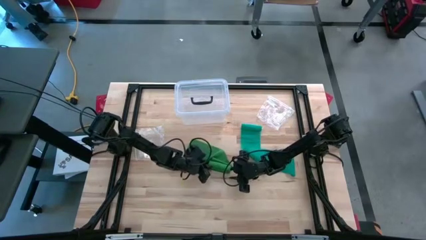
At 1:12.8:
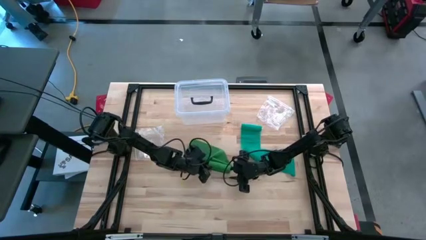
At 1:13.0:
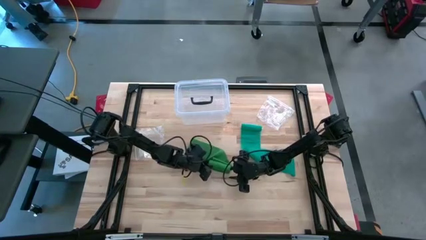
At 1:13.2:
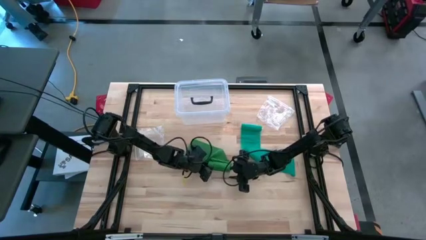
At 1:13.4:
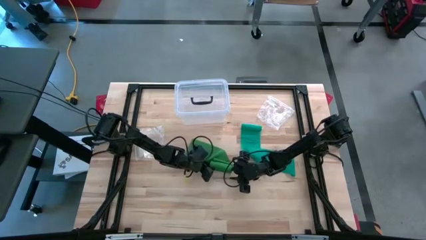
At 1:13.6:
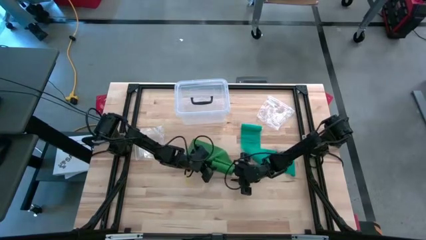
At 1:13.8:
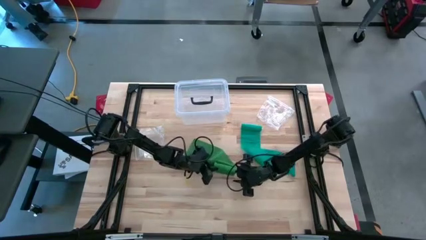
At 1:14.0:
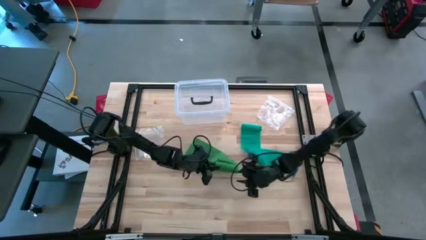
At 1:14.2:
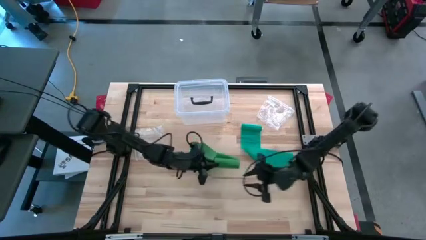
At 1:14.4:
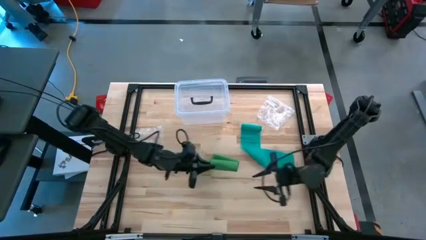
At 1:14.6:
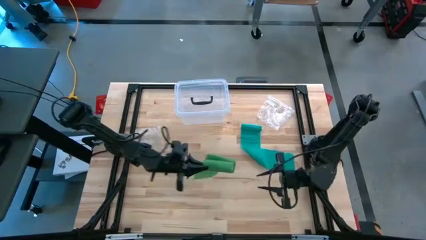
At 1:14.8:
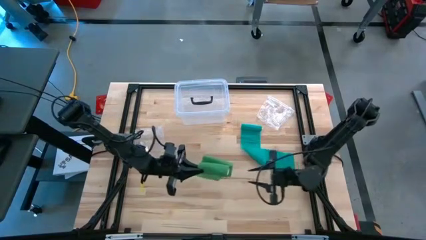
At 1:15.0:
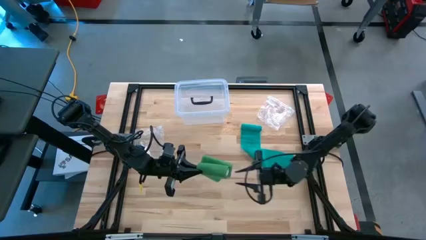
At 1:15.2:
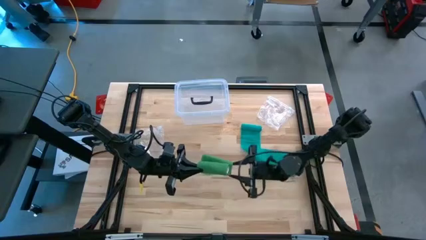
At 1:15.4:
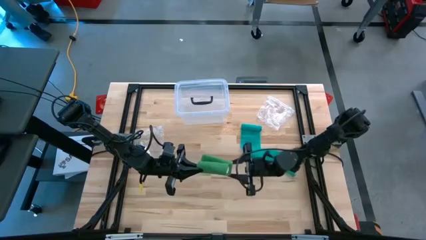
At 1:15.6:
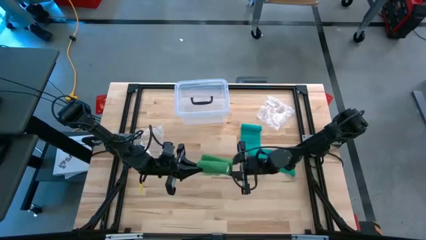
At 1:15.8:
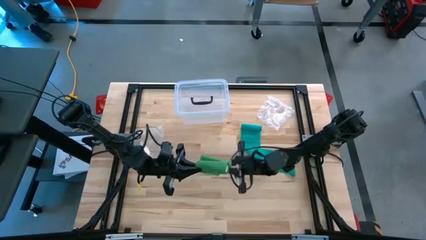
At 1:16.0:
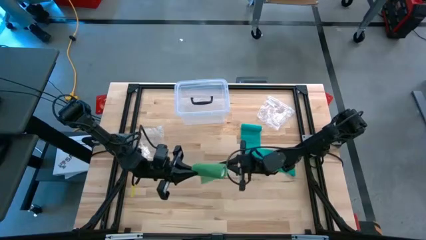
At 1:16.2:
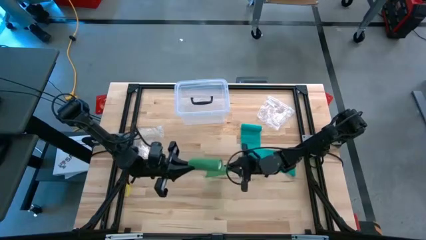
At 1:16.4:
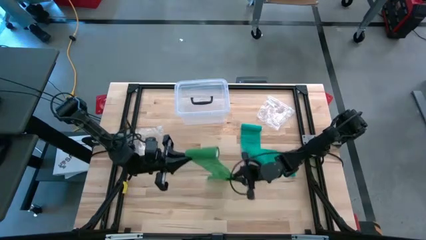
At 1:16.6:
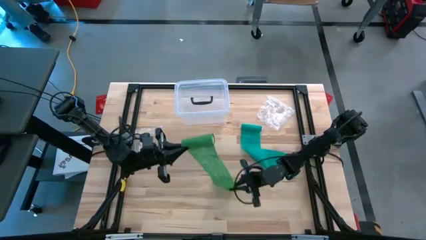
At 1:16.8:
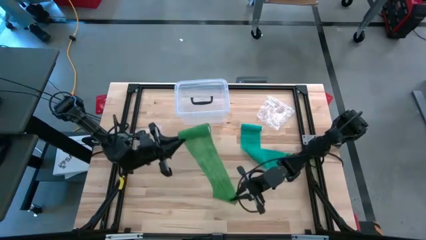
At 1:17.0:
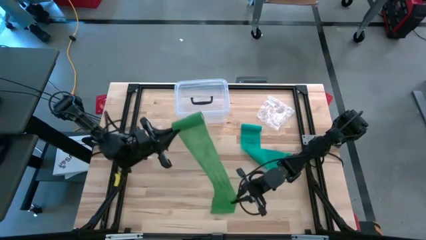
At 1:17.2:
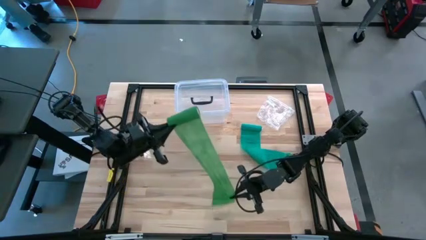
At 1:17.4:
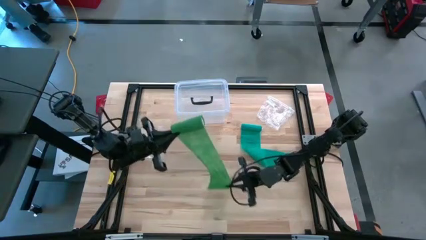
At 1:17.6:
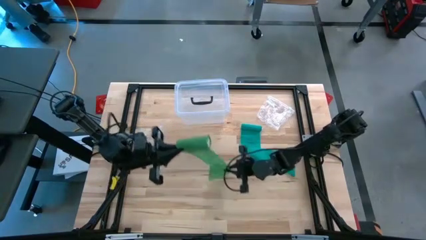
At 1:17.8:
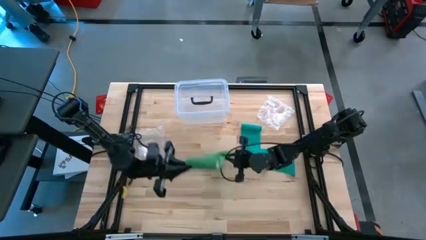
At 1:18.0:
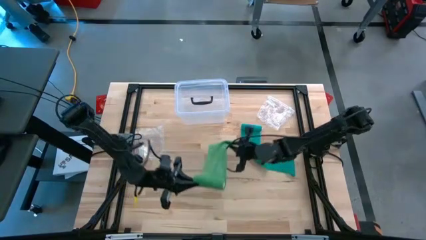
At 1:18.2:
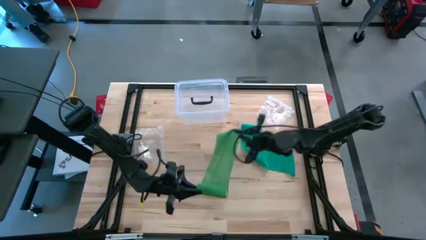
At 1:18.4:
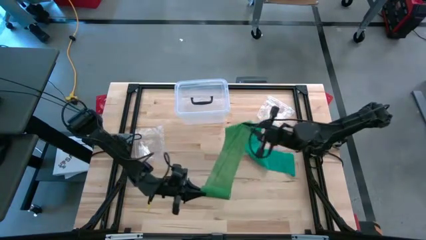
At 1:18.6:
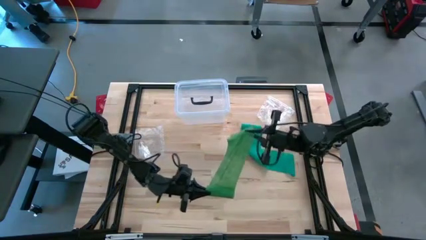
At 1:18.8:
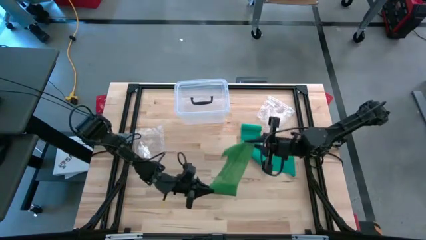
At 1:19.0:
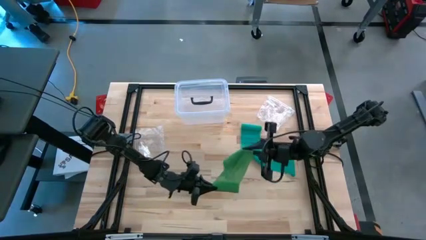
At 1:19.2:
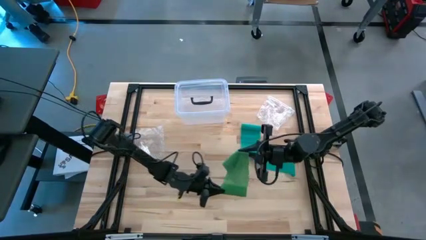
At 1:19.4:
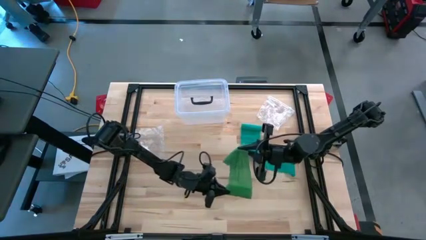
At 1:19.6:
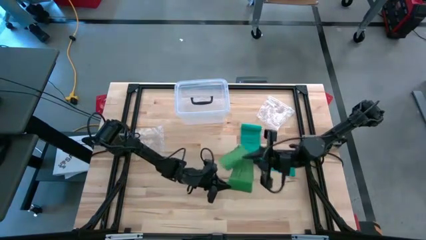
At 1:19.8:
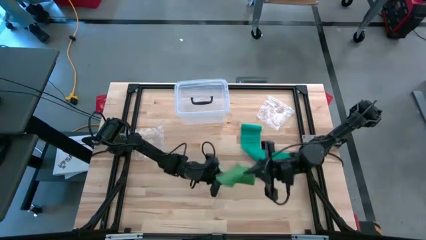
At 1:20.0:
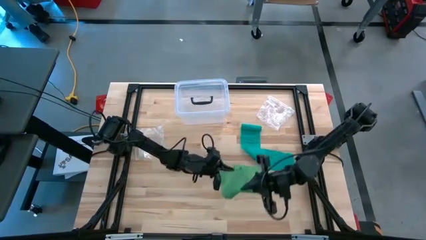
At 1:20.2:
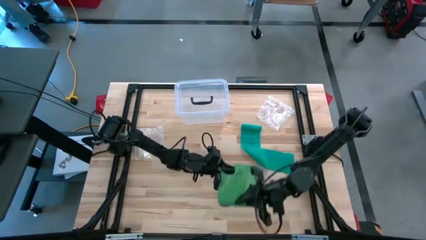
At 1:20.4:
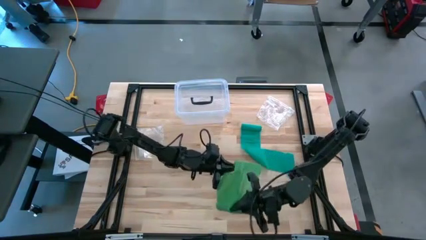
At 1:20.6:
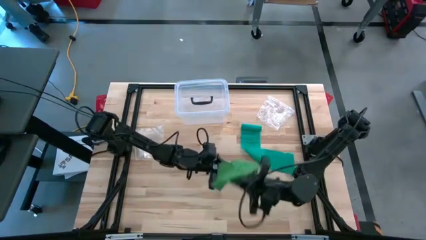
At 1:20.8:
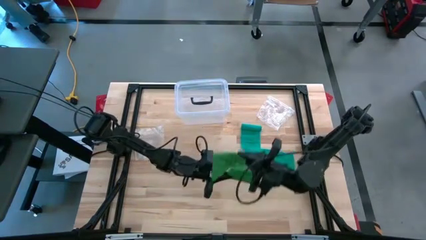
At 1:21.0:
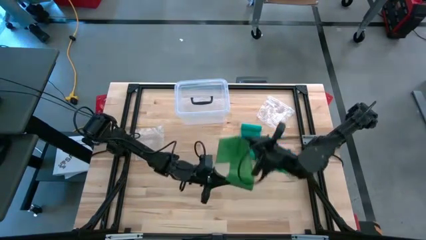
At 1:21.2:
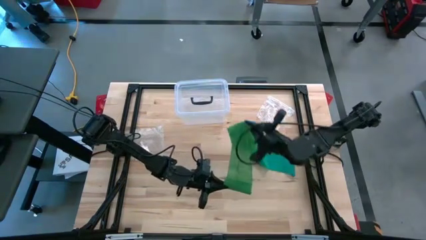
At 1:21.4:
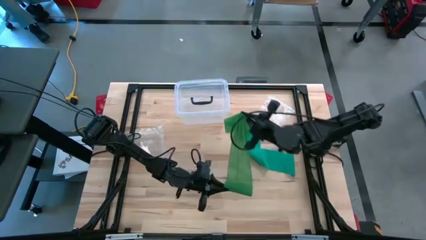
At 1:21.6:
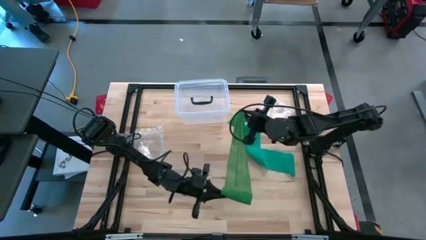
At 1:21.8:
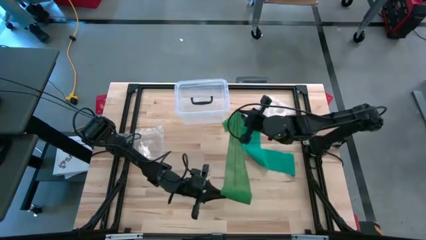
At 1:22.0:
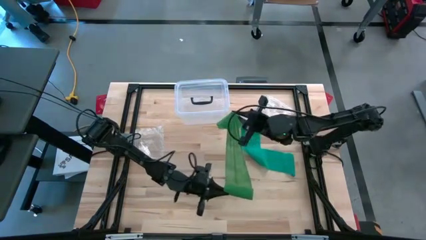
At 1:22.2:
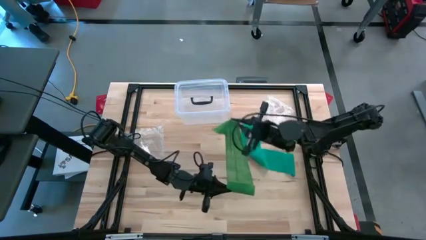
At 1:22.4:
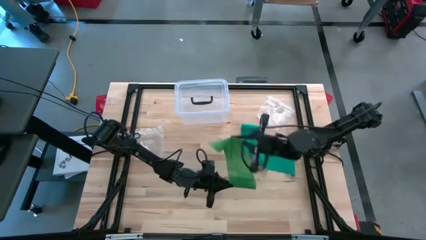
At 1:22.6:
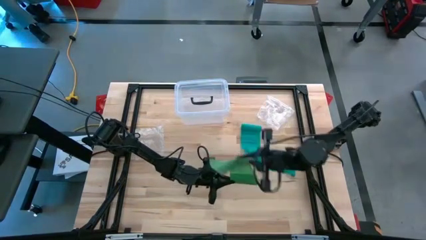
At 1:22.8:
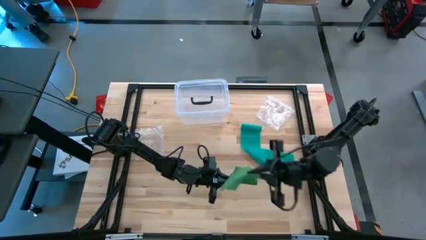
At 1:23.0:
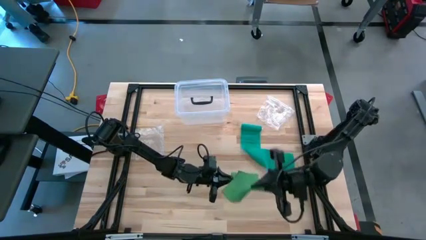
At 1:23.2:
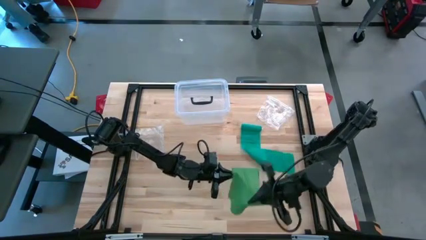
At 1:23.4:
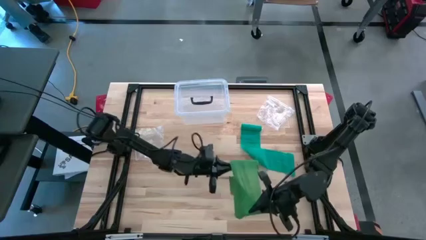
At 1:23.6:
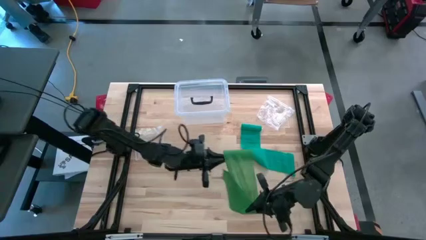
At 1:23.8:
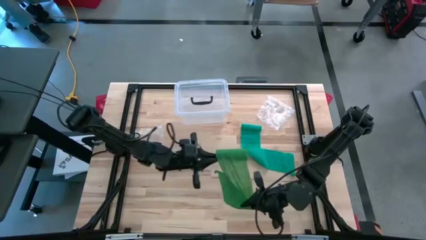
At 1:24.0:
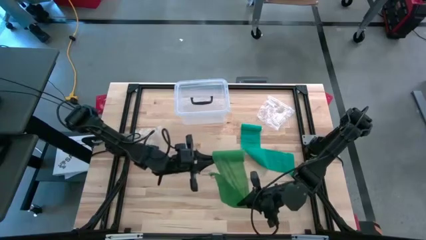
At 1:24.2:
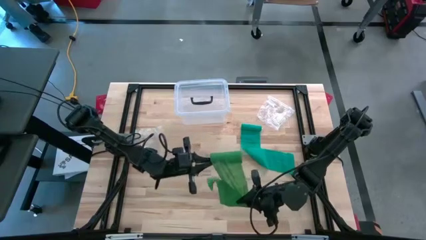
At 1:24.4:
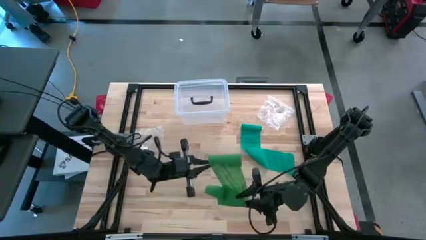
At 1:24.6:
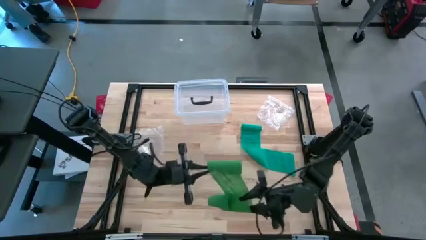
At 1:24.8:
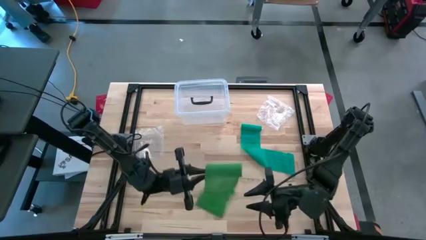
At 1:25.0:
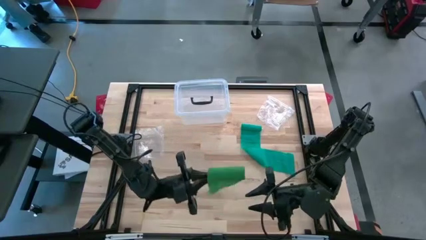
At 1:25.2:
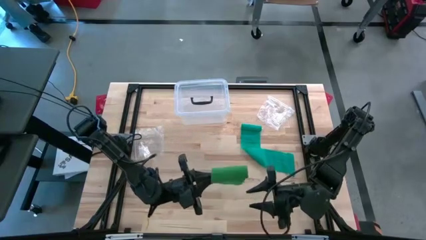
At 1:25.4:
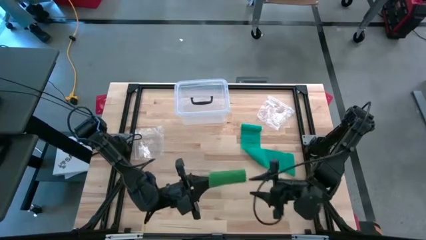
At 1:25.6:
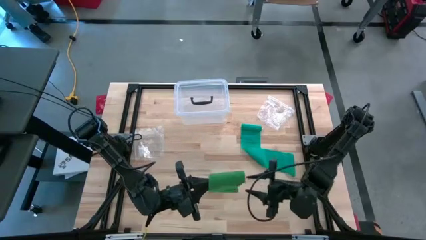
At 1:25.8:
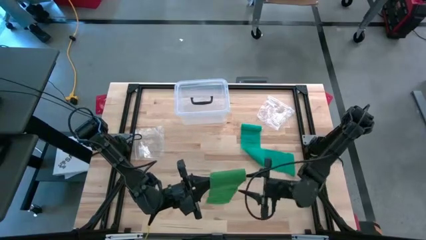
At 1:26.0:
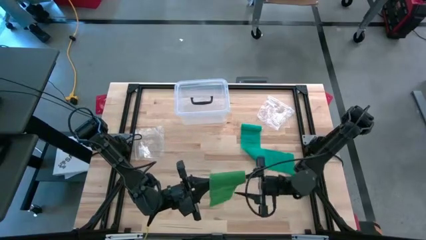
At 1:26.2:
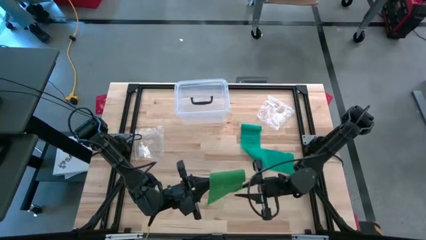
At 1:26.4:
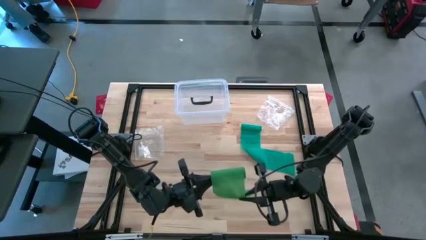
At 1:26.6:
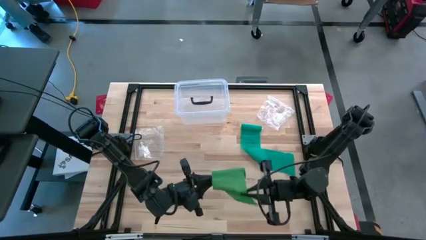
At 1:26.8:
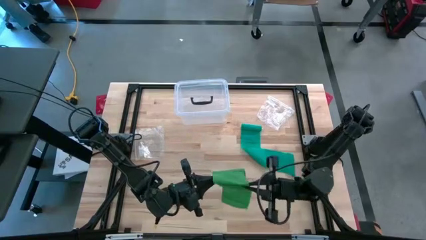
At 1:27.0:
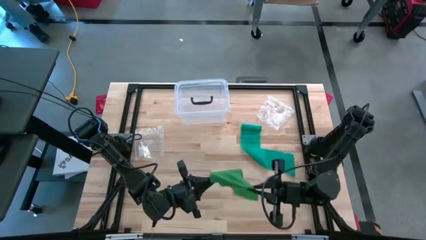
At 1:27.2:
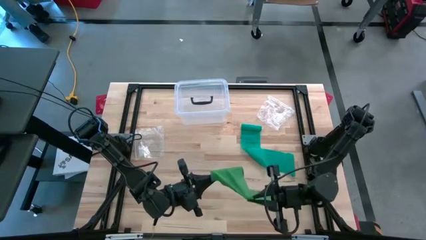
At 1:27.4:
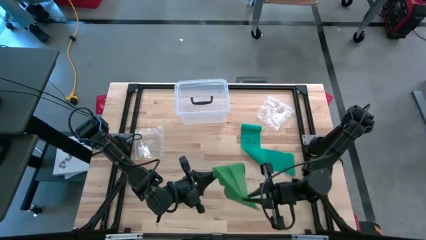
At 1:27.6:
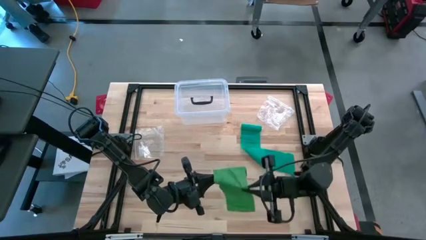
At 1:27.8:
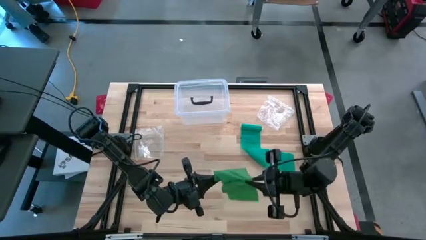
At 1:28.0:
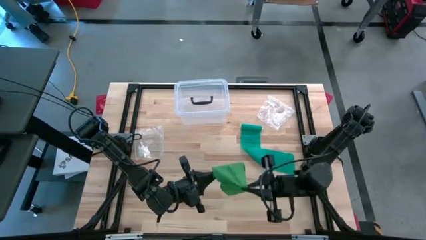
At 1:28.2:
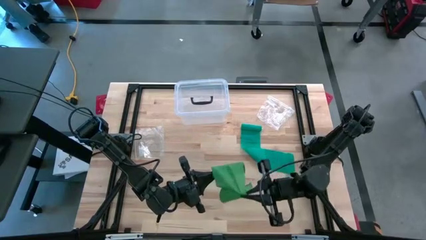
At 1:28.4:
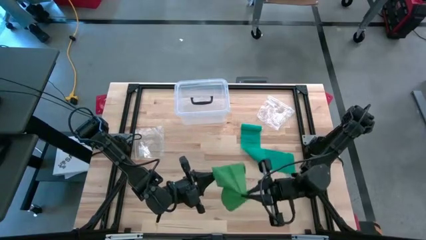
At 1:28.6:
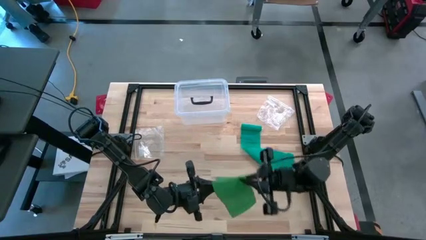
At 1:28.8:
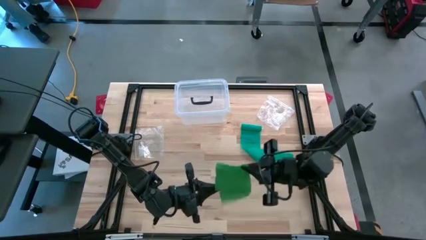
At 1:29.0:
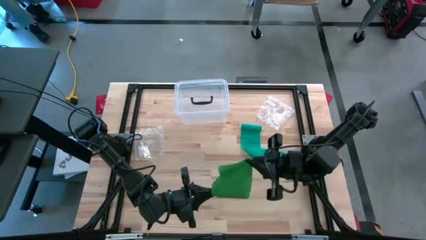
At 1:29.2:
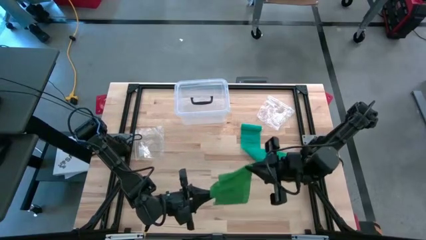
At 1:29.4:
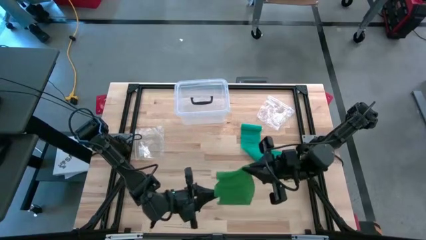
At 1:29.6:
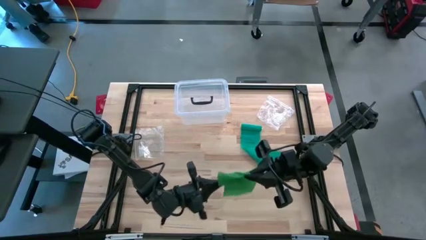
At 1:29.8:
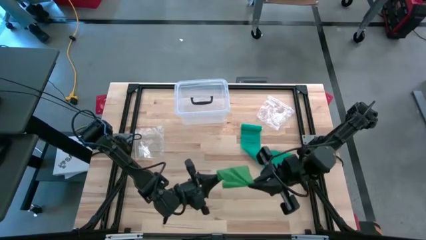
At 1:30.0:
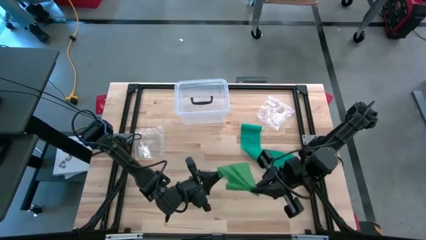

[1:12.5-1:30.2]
Task: Roll bandage
Roll the green bandage
